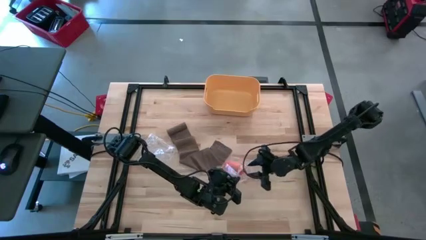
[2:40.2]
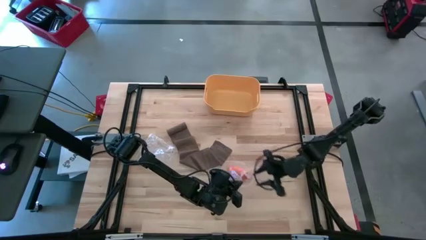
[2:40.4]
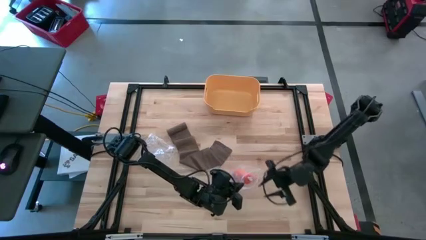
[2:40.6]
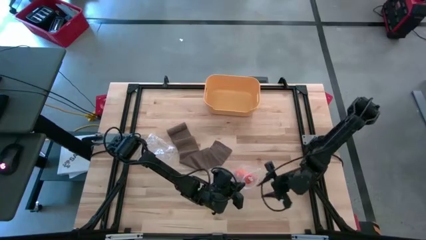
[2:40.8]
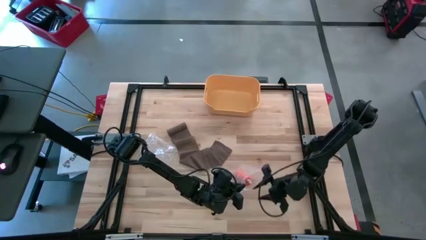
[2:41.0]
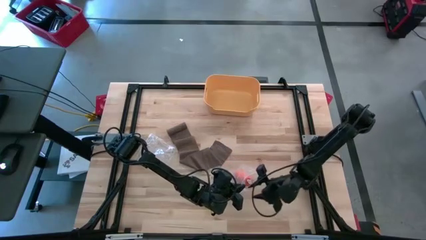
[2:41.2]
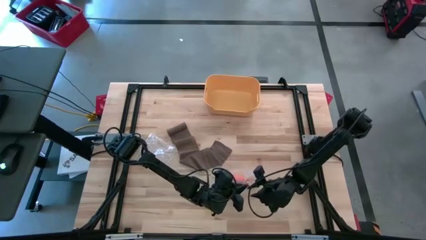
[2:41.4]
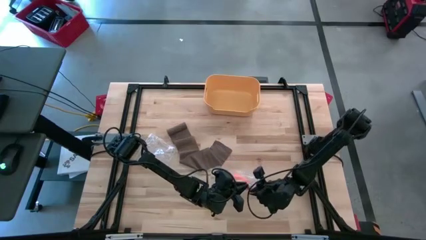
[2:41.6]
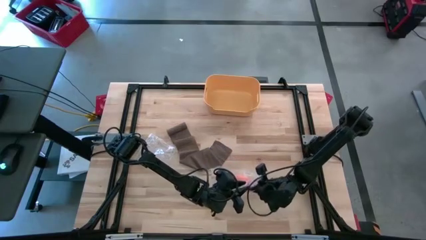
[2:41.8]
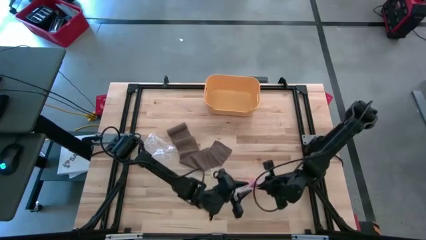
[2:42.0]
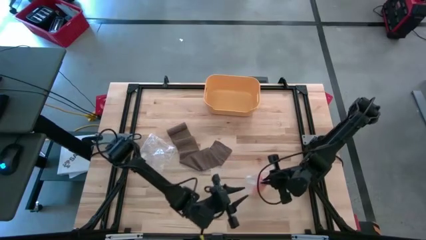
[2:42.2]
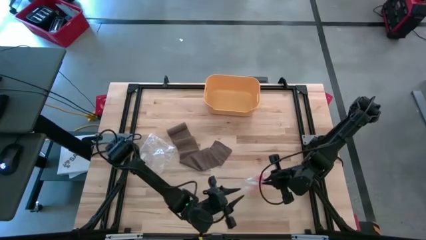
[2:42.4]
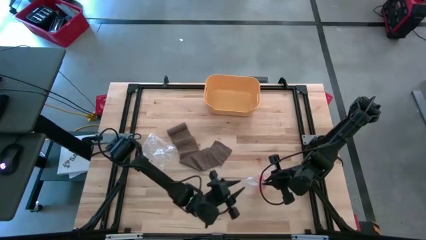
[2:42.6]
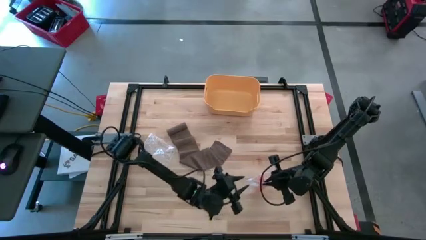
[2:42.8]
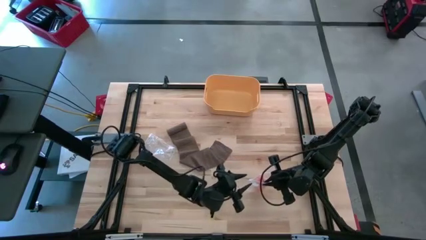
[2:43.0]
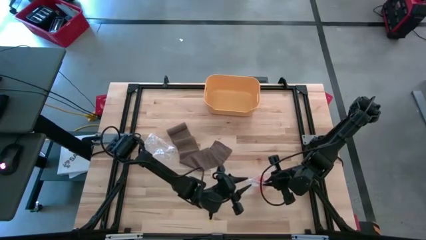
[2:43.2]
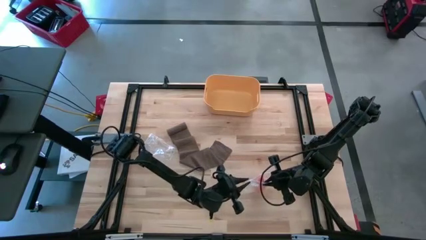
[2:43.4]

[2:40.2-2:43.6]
Task: Roll bandage
Close the bottom transparent zip bag

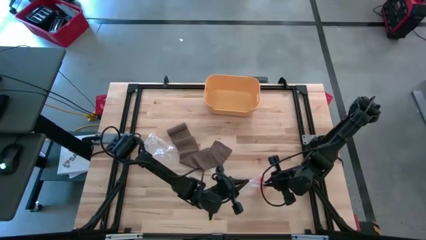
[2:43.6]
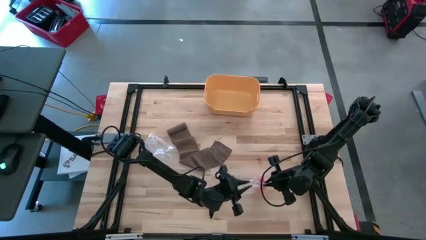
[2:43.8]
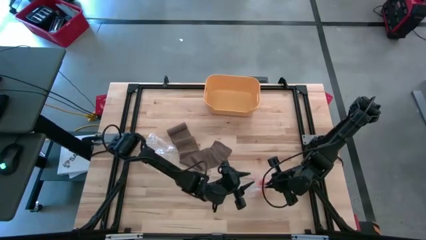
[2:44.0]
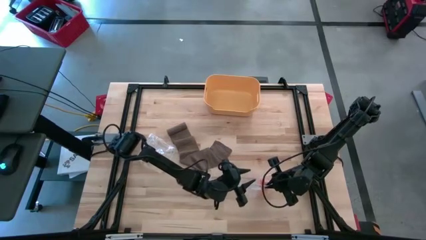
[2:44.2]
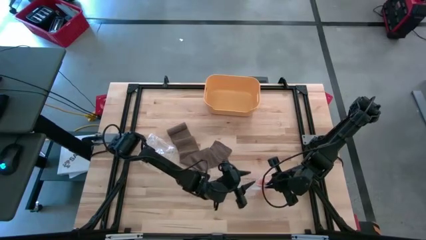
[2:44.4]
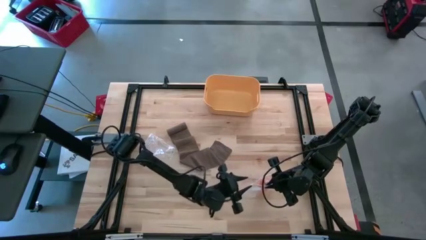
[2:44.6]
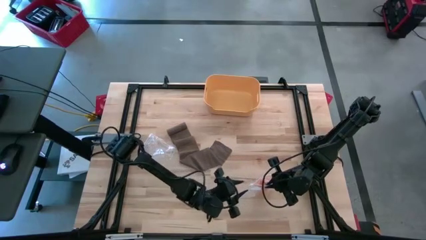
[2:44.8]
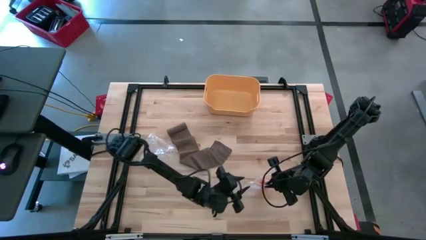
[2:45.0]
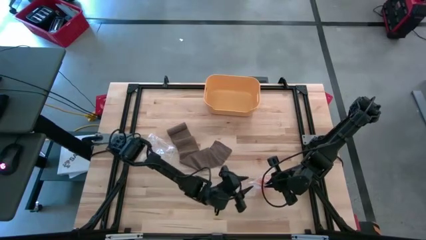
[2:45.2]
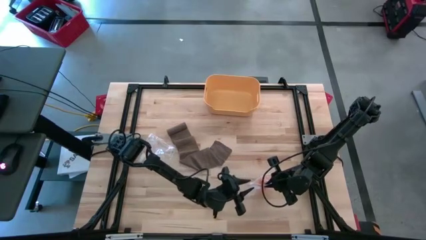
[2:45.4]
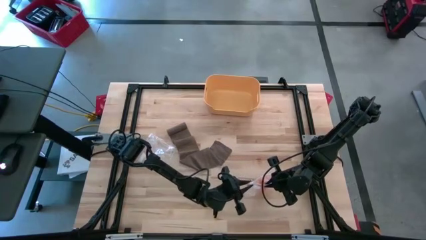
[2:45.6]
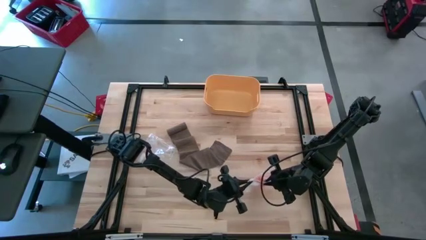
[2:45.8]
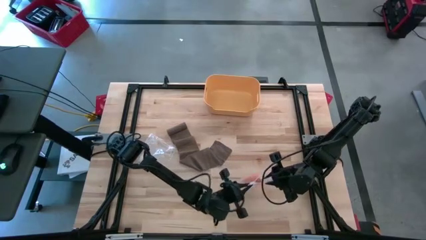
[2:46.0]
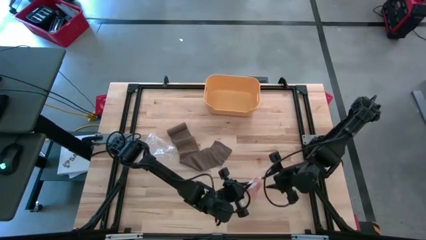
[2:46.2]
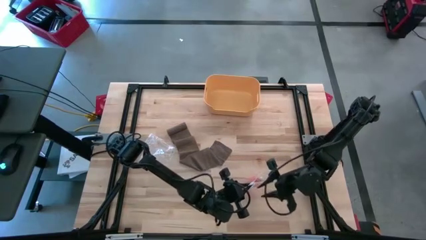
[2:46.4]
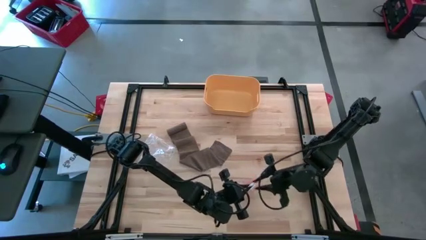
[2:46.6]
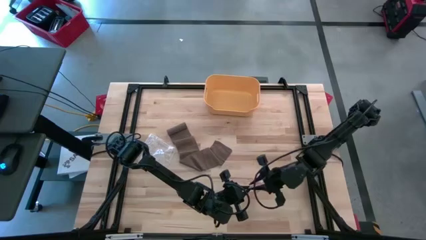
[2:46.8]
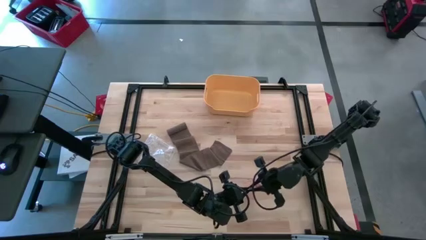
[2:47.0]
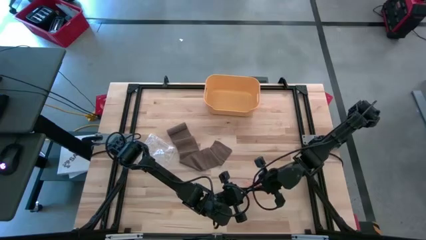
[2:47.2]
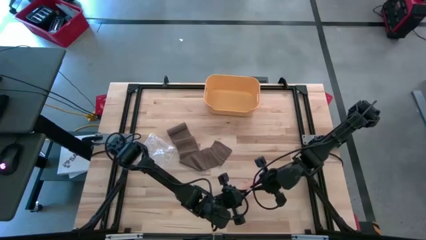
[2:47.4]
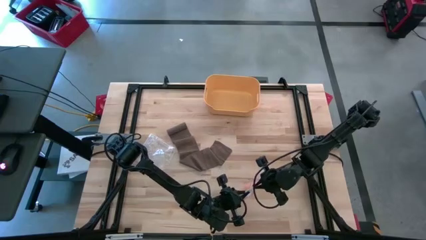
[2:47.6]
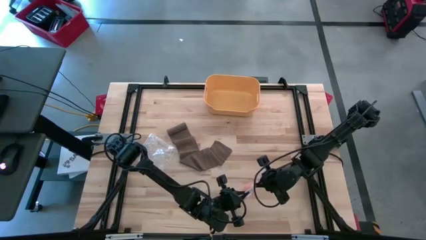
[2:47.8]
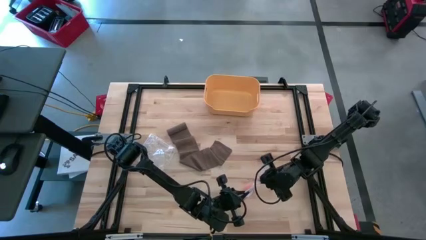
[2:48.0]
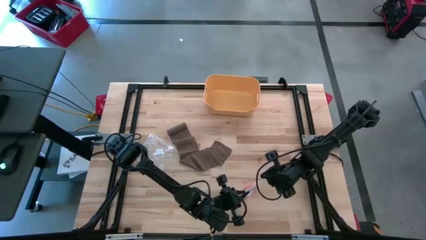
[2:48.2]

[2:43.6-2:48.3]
Close the bottom transparent zip bag

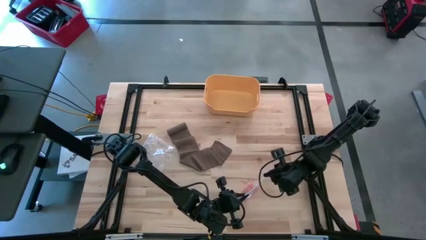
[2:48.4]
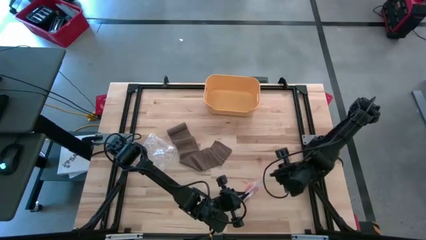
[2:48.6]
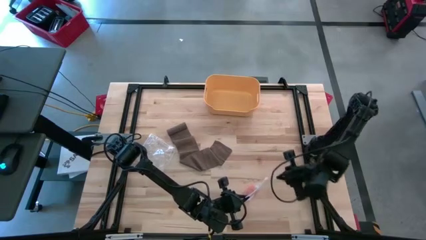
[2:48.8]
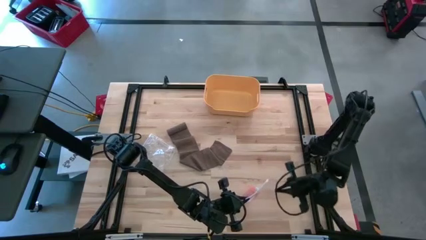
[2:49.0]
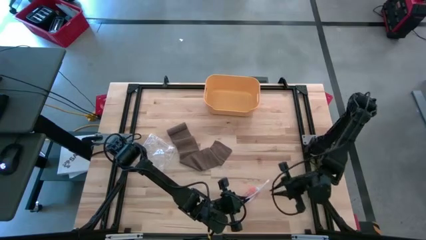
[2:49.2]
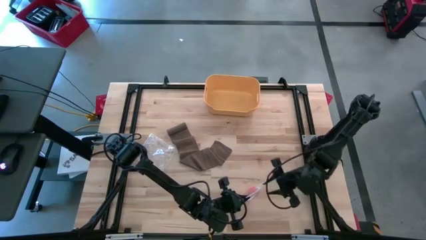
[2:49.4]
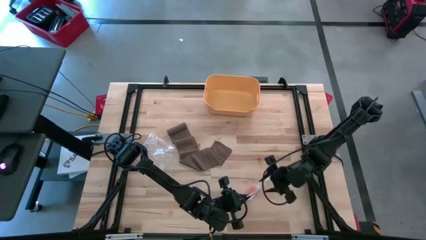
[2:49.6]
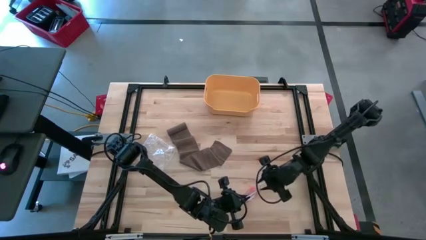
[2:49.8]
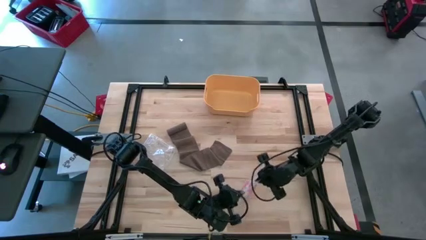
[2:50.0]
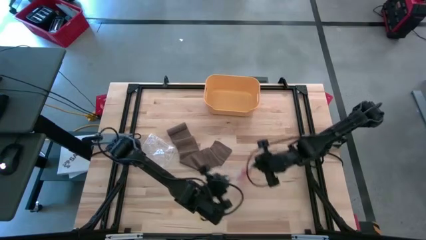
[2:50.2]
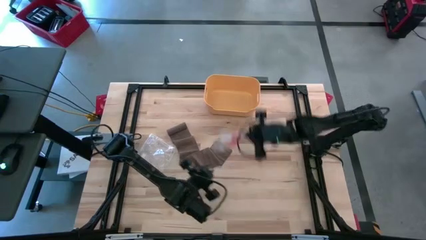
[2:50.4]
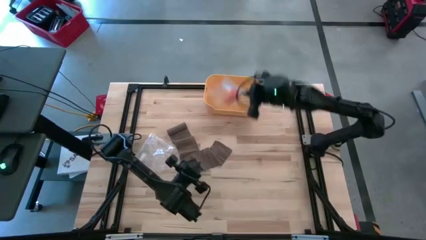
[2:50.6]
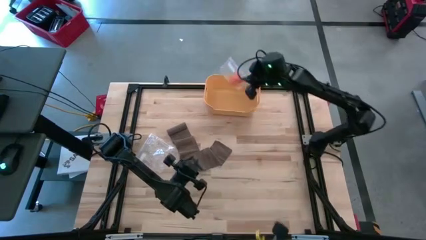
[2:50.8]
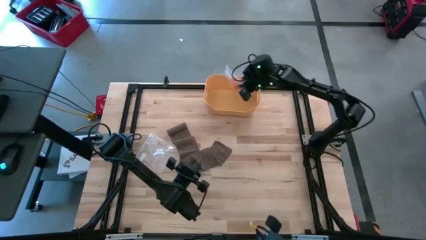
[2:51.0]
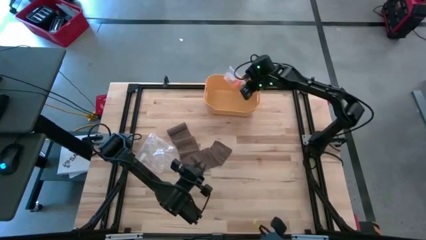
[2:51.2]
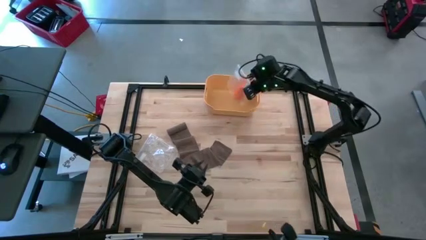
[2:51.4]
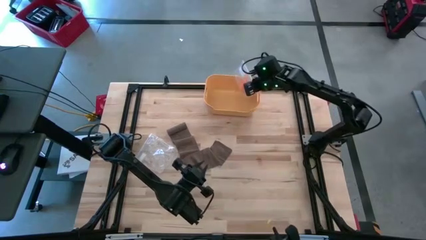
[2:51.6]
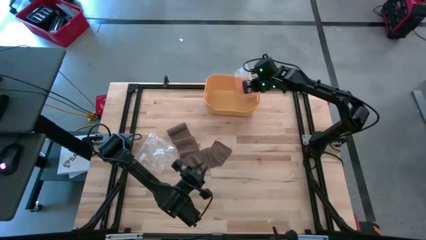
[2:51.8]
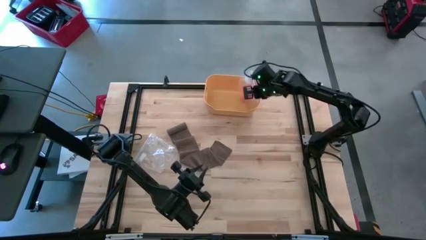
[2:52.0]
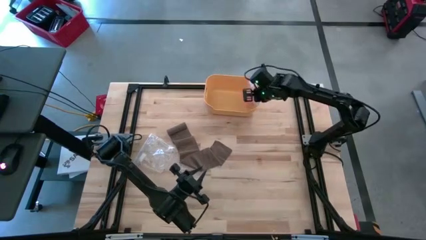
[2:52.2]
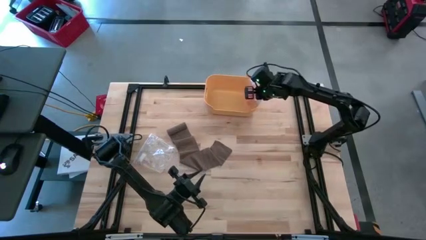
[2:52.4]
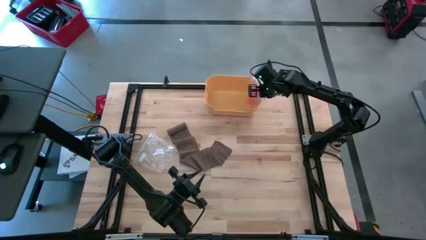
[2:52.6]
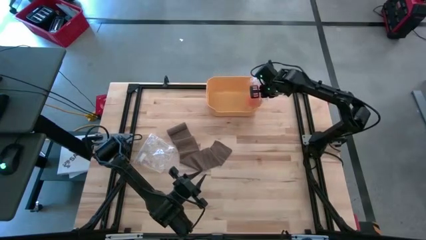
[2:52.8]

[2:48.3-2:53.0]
Put the bottom transparent zip bag into the orange bin

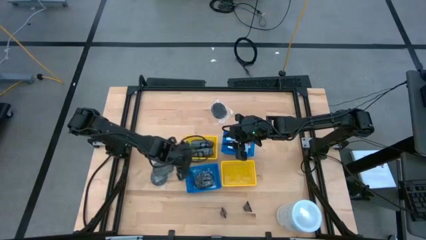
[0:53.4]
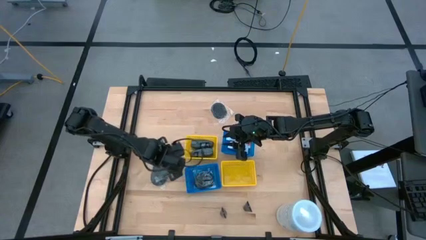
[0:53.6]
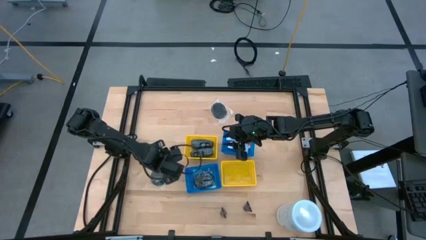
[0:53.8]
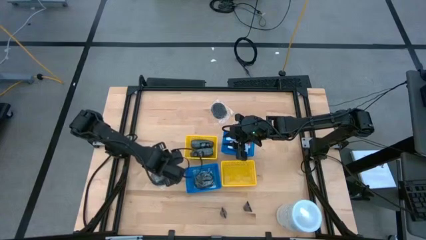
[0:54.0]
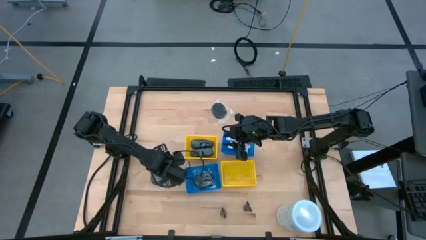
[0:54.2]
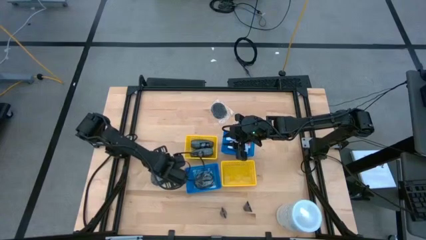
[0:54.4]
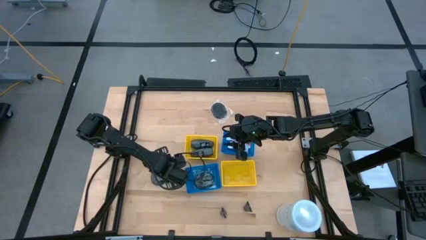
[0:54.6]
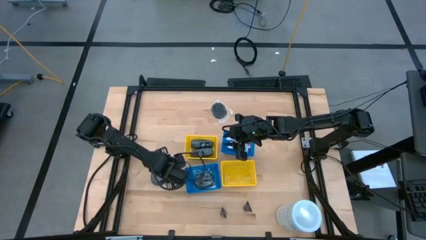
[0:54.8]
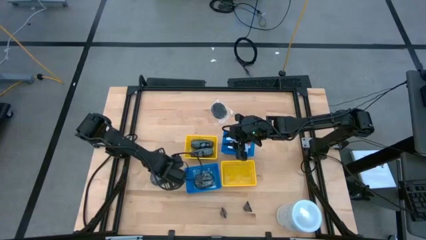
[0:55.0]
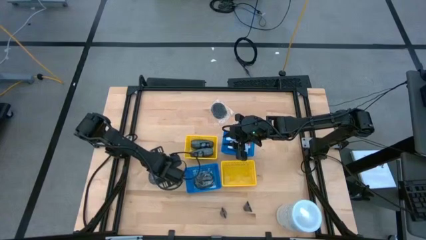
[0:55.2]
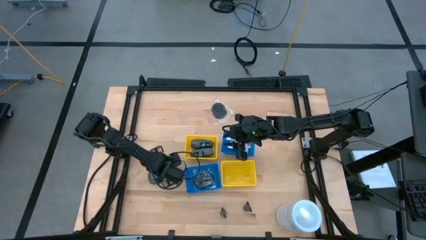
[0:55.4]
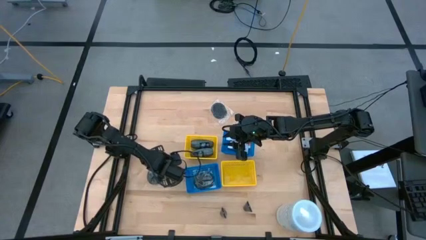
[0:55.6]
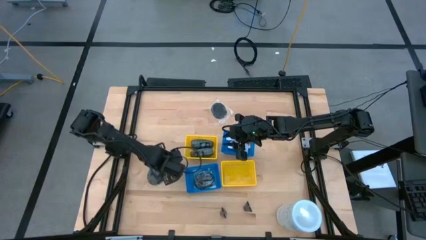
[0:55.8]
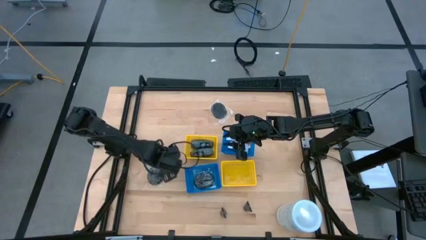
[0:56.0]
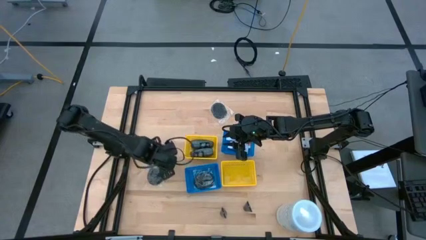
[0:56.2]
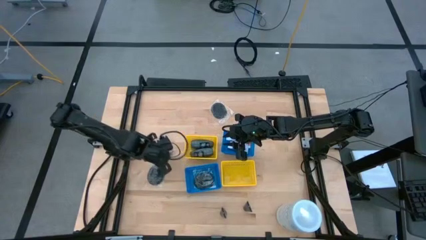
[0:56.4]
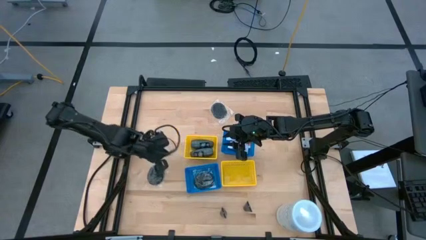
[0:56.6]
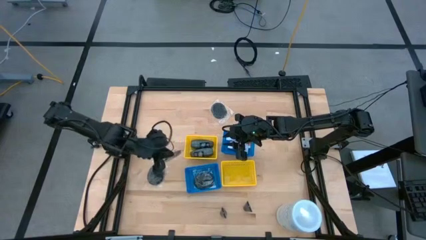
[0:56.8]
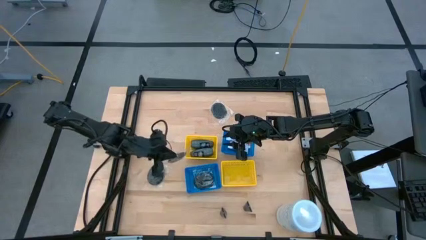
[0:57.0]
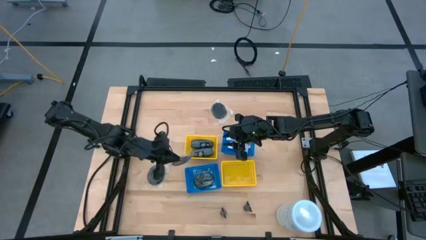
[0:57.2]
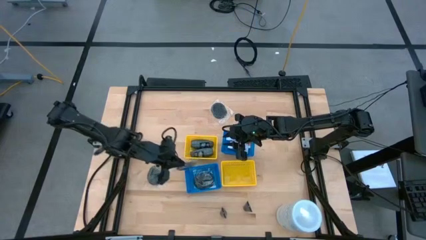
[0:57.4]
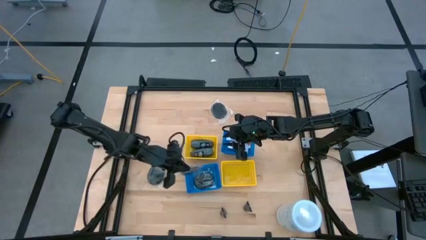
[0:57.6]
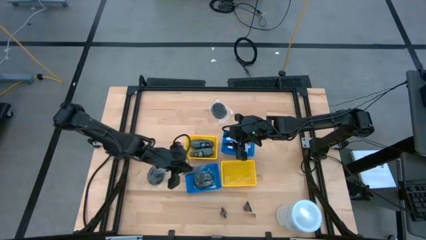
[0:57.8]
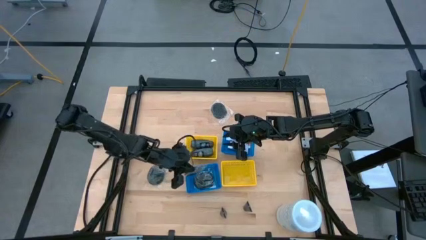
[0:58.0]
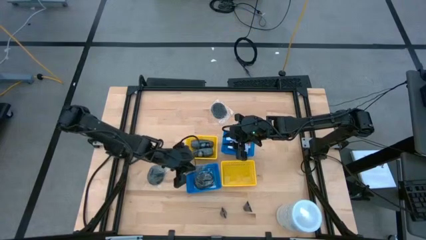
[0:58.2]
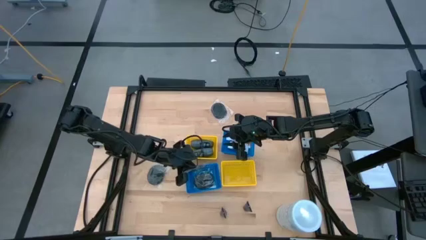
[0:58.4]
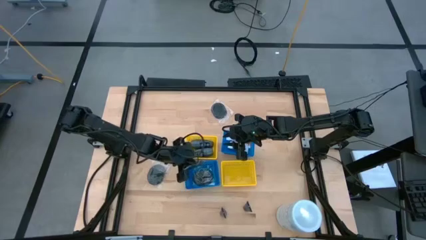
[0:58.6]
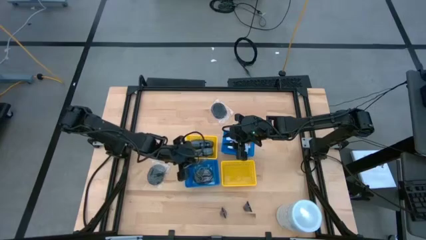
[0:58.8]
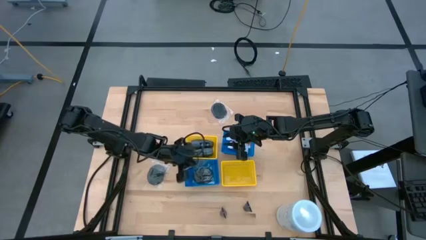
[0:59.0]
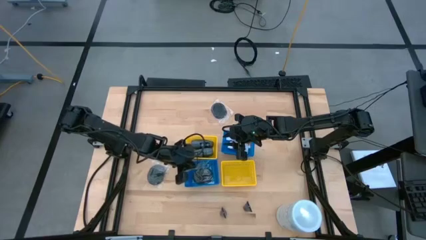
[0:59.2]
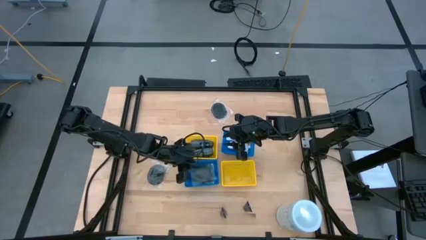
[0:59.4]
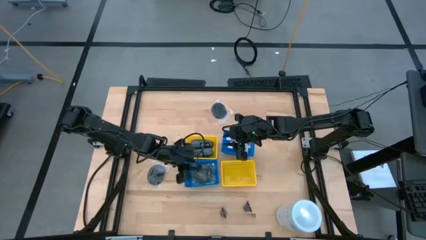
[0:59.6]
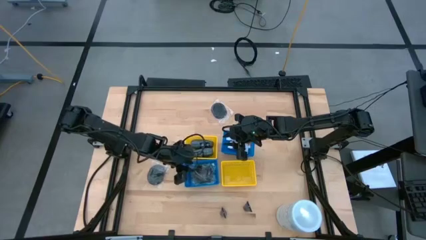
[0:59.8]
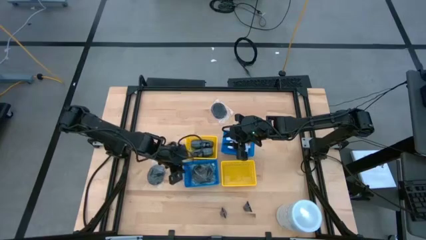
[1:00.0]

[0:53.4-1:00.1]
Task: Pick & Place Travel size toiletries
Put the top left hairbrush into the bottom left blue bin
